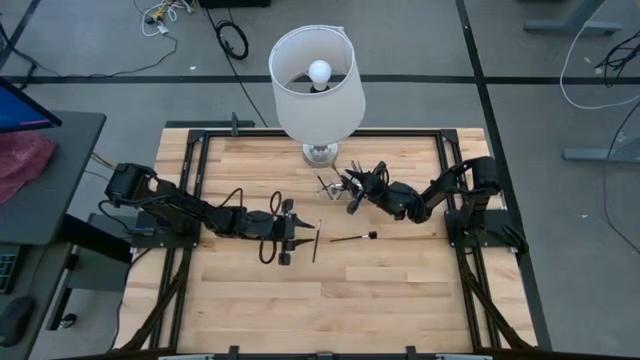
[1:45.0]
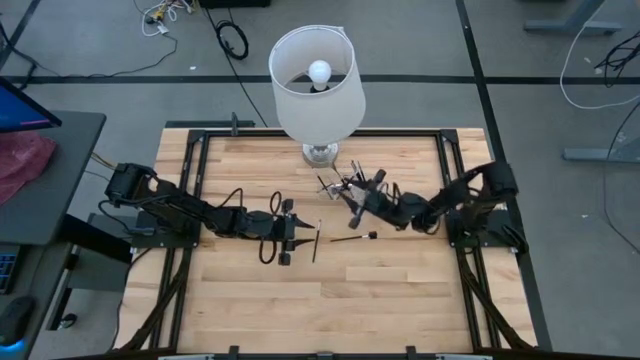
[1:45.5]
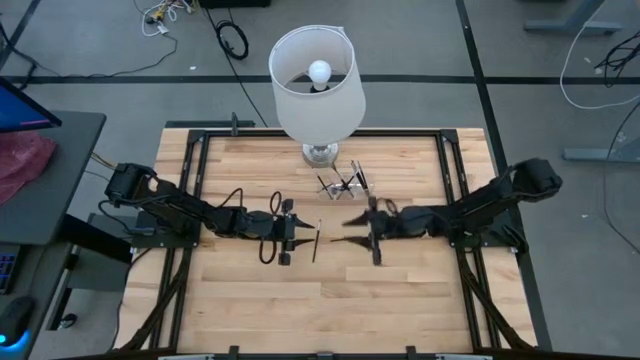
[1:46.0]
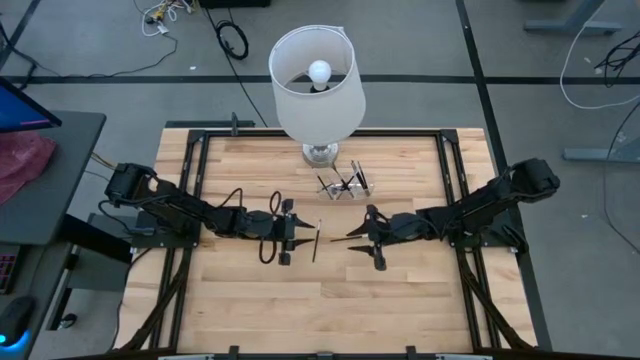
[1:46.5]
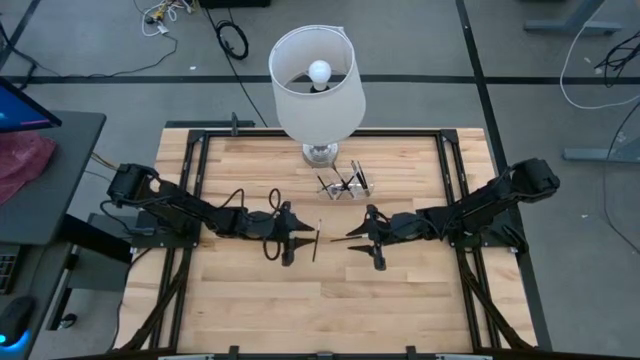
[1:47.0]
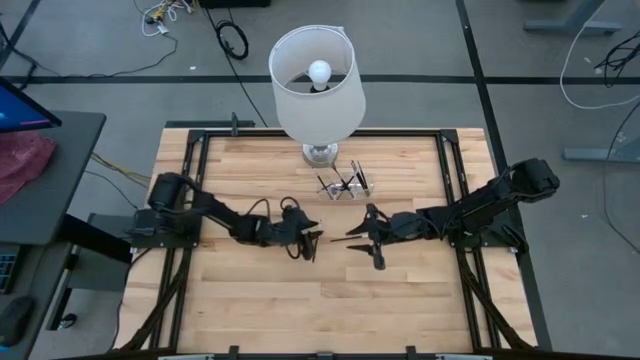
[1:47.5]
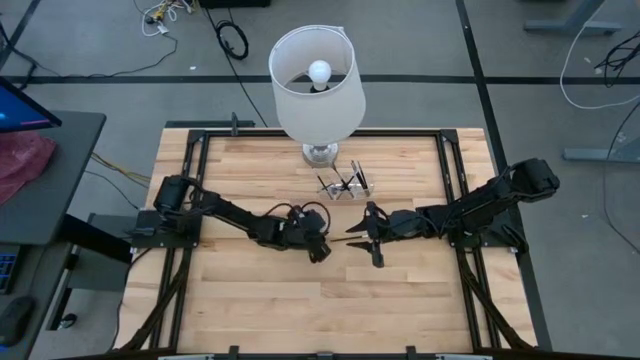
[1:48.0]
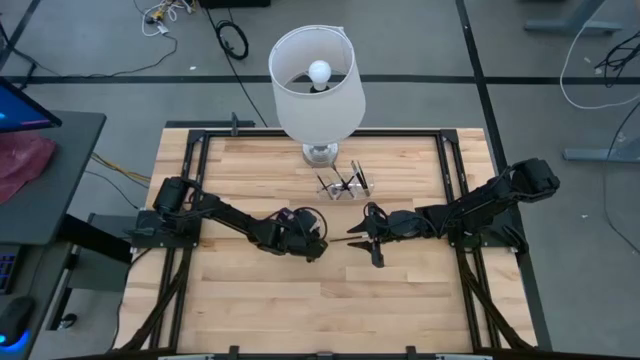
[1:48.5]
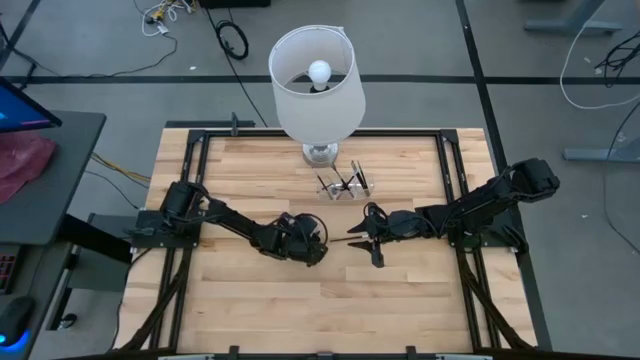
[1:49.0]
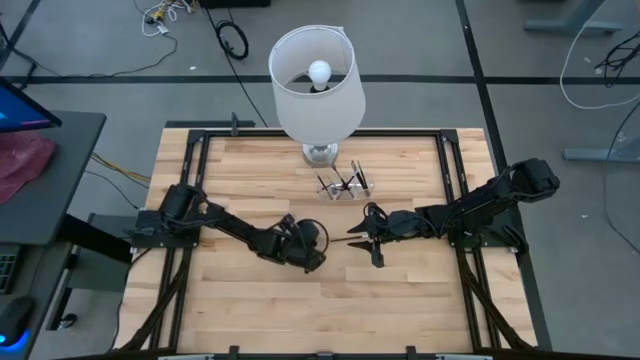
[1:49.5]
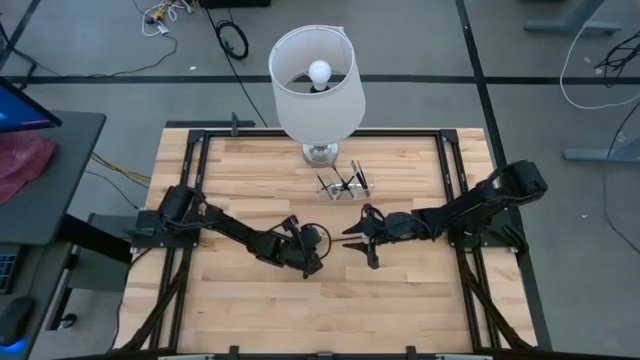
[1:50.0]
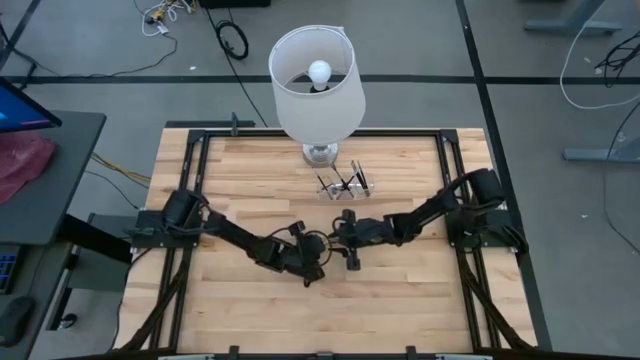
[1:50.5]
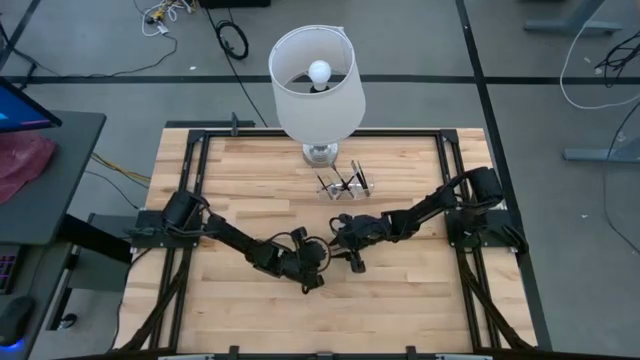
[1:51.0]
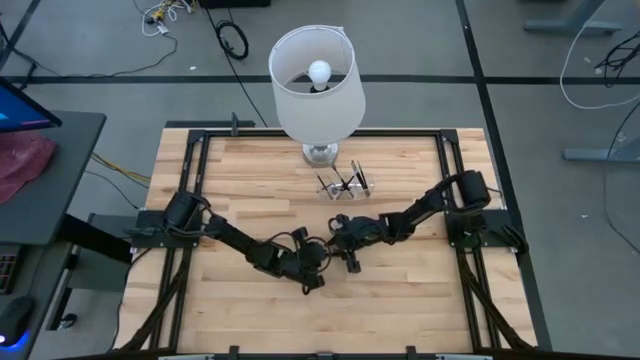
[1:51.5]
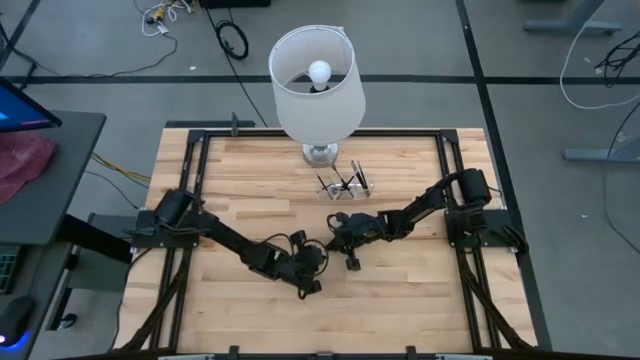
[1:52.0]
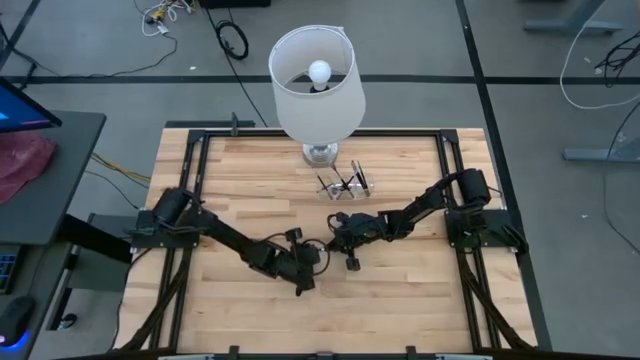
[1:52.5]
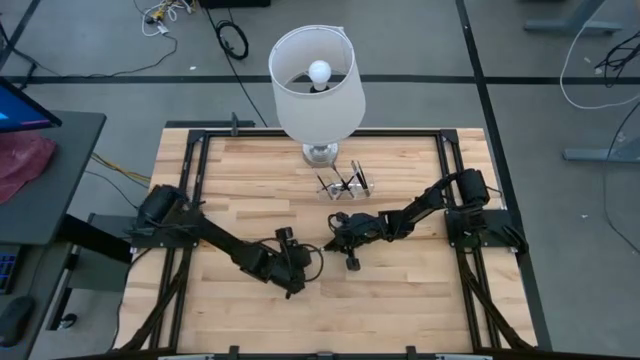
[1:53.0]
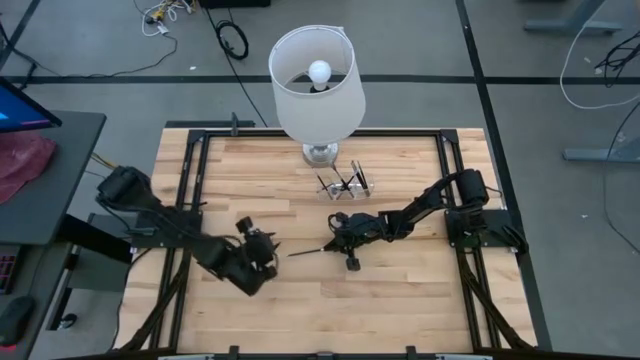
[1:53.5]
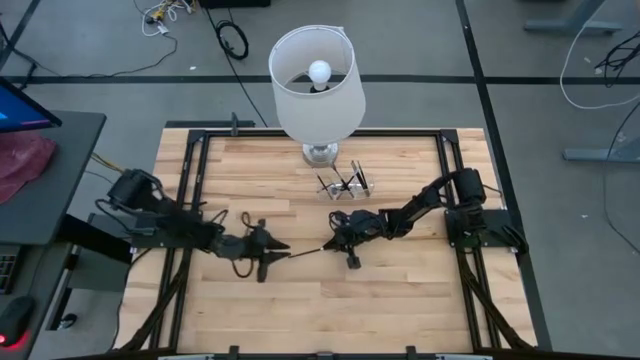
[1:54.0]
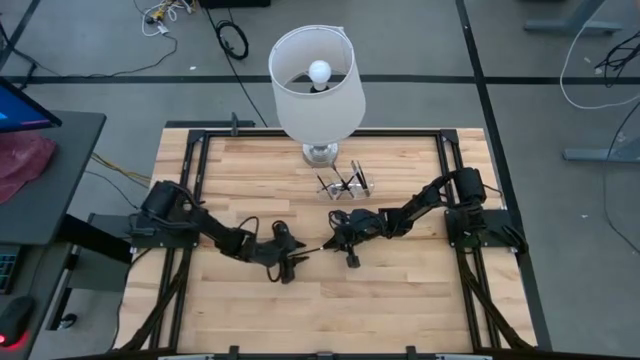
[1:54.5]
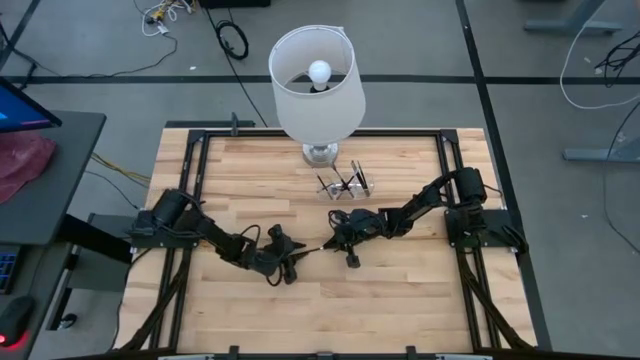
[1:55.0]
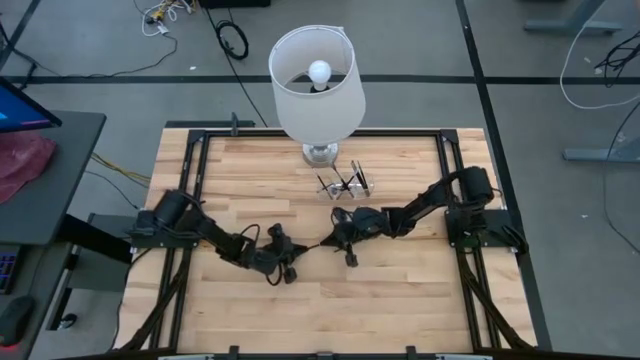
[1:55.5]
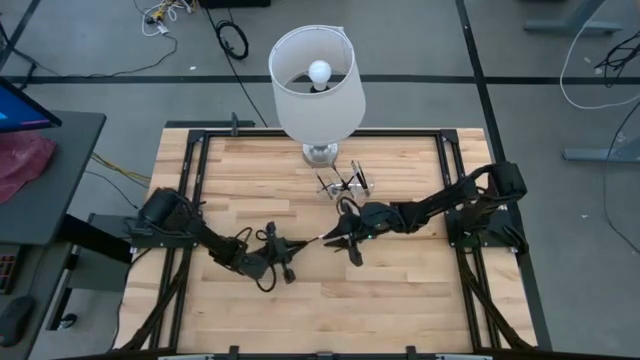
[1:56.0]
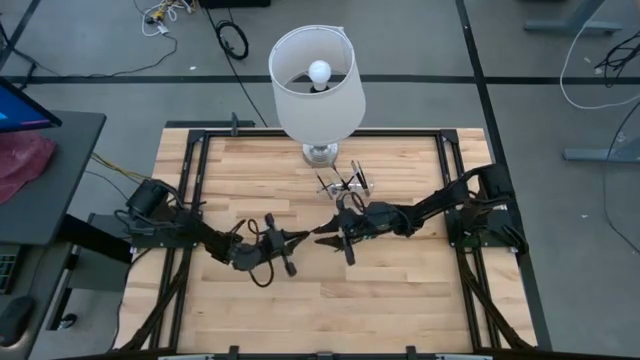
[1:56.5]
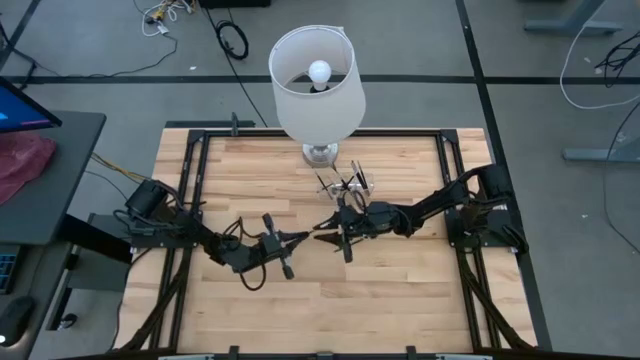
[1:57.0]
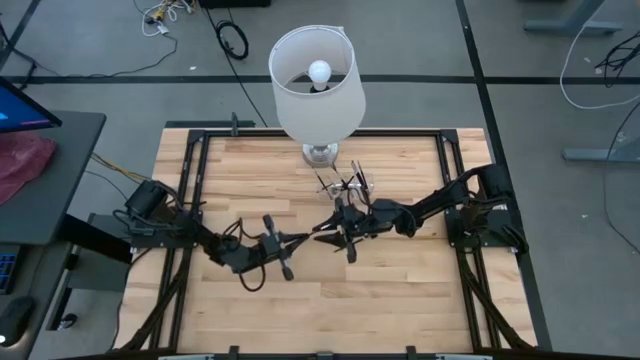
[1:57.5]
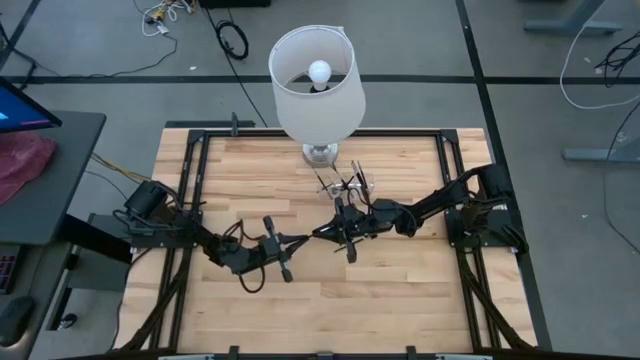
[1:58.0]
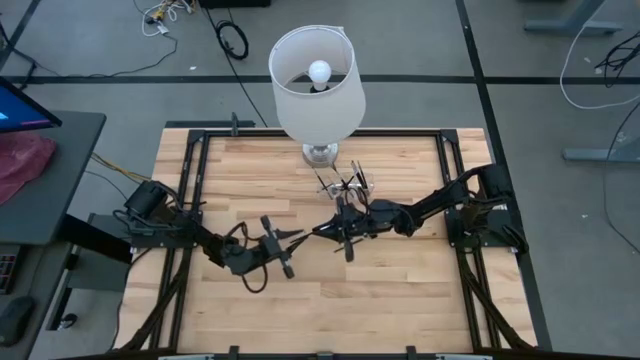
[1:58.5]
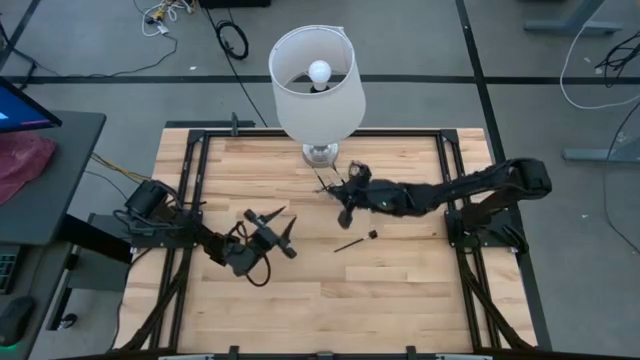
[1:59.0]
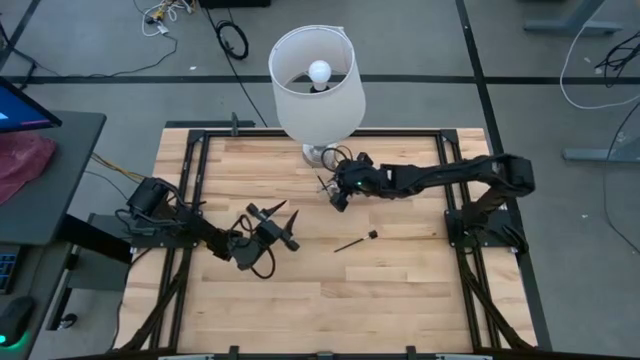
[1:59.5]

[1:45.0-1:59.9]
Task: Put items in baskets/containers
Put the black eyeshadow brush into the transparent organizer

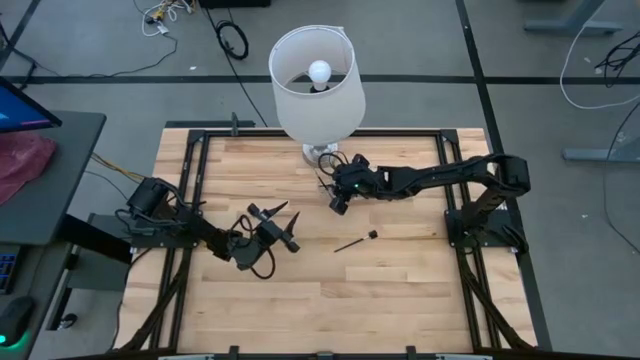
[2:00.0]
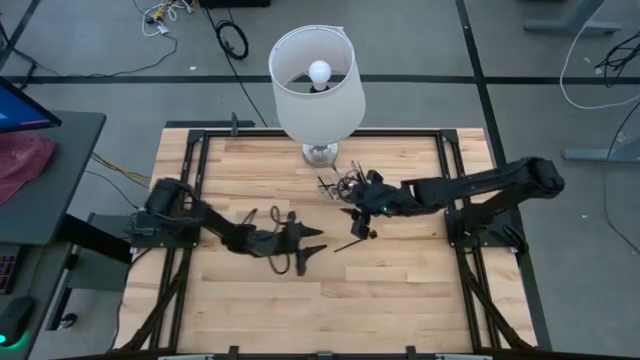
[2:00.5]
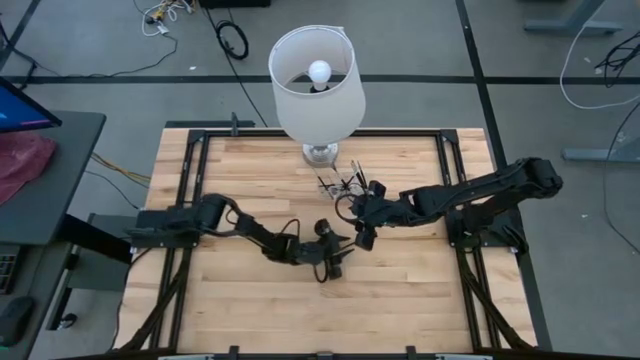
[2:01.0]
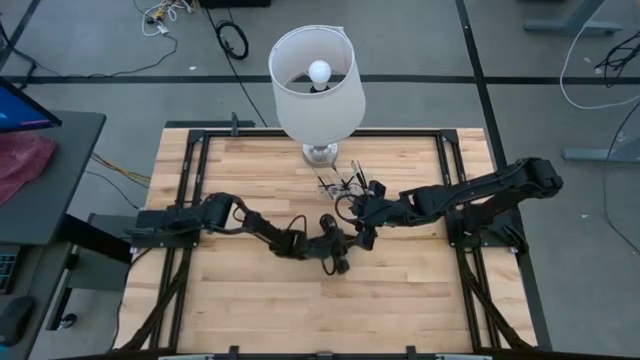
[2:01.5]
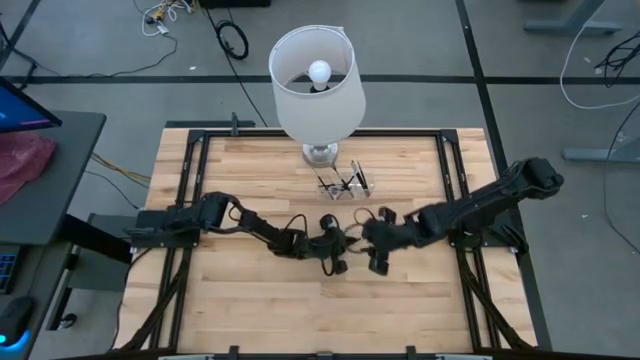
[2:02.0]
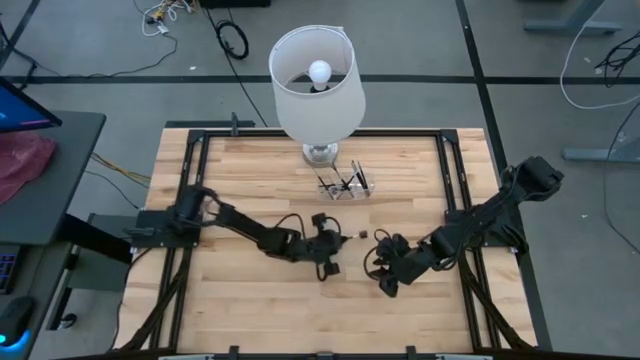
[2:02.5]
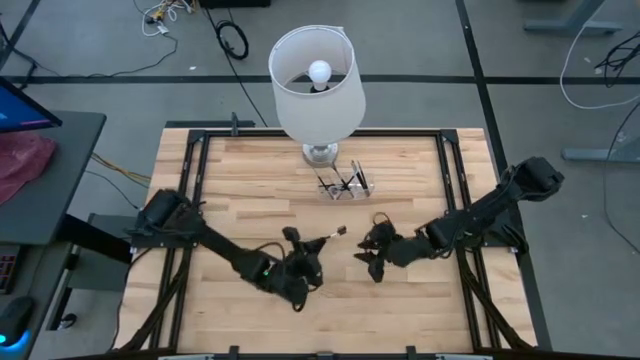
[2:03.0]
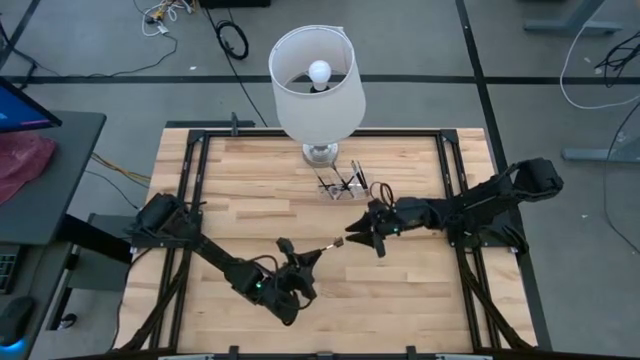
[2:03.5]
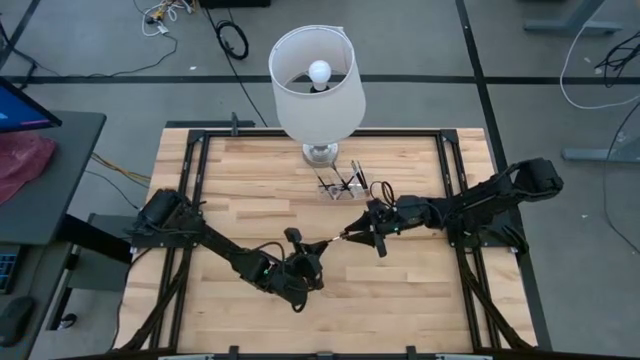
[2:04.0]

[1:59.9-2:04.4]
Put the black brow brush into the transparent organizer
